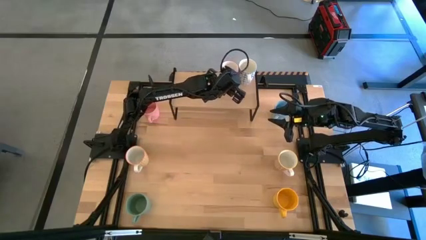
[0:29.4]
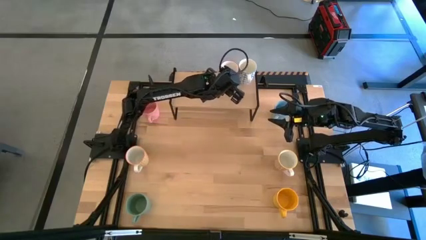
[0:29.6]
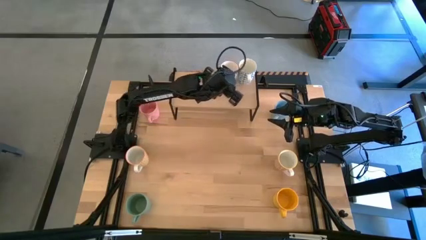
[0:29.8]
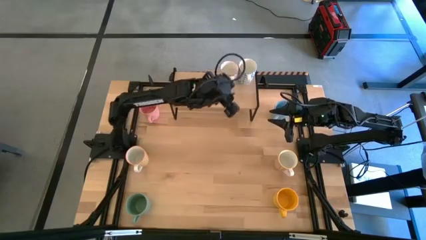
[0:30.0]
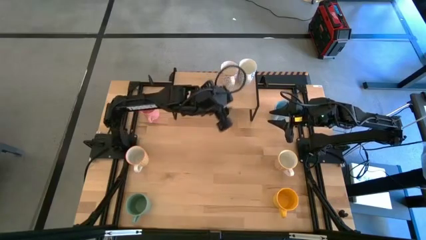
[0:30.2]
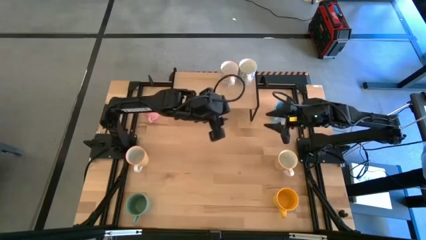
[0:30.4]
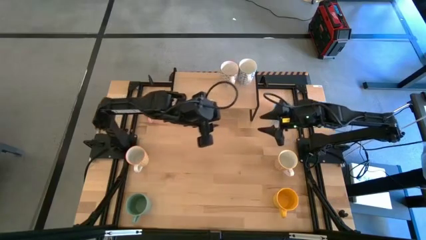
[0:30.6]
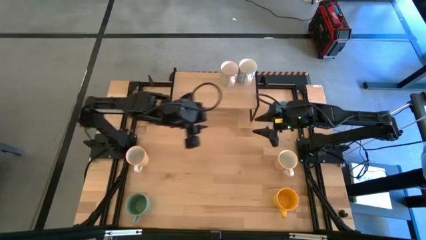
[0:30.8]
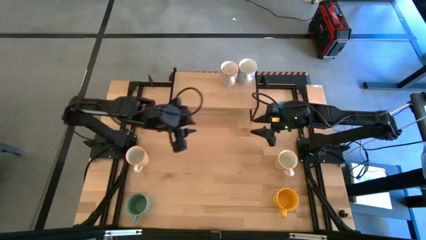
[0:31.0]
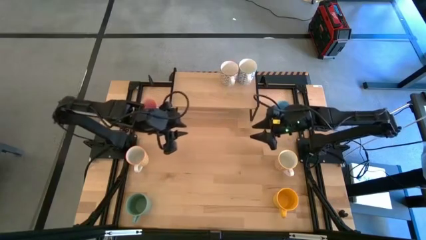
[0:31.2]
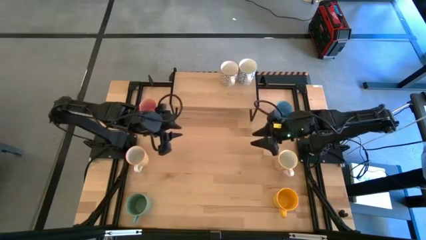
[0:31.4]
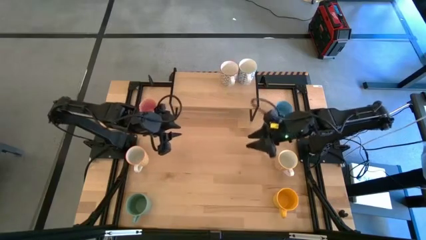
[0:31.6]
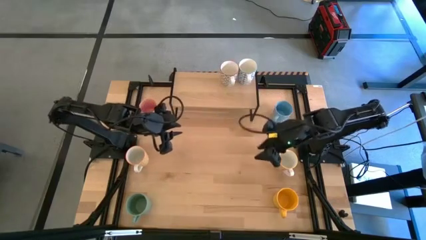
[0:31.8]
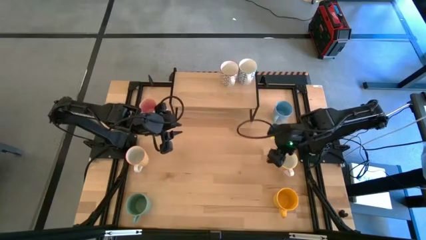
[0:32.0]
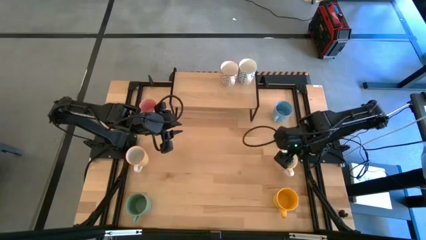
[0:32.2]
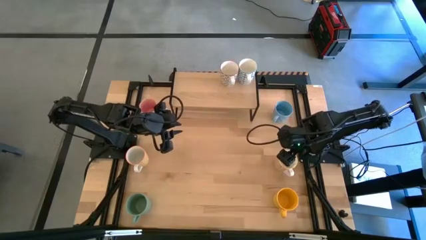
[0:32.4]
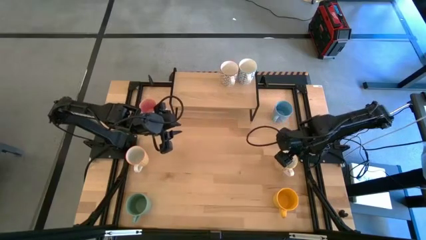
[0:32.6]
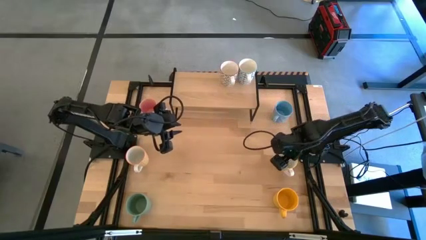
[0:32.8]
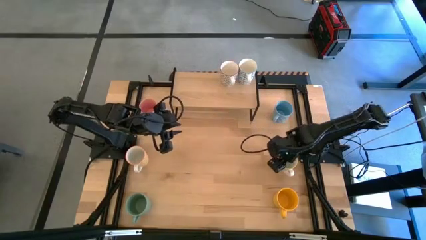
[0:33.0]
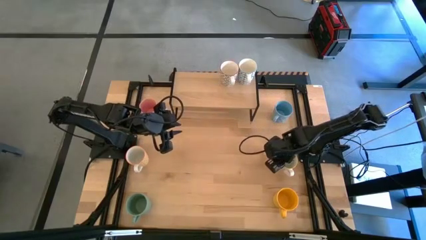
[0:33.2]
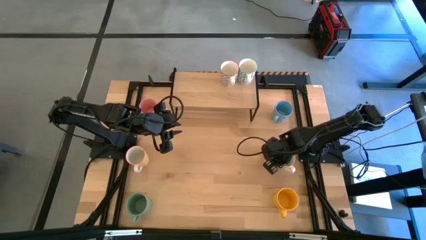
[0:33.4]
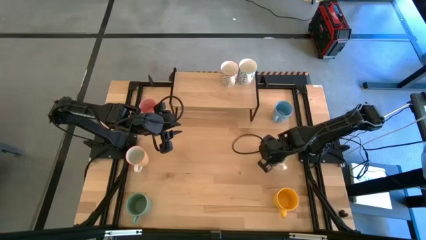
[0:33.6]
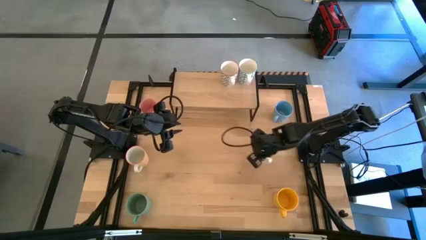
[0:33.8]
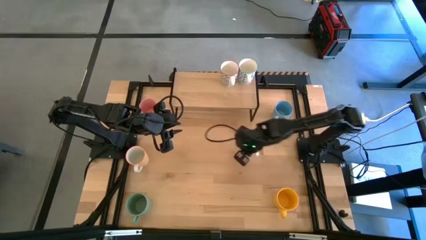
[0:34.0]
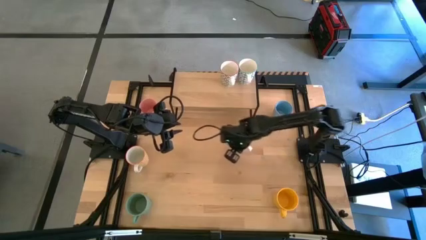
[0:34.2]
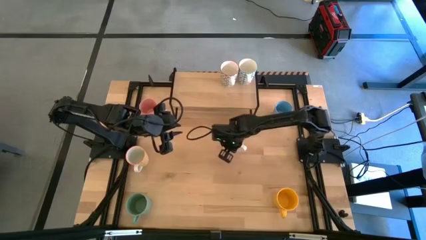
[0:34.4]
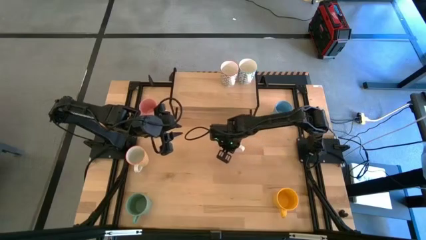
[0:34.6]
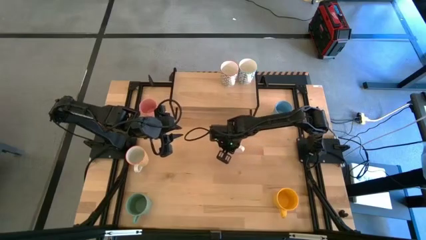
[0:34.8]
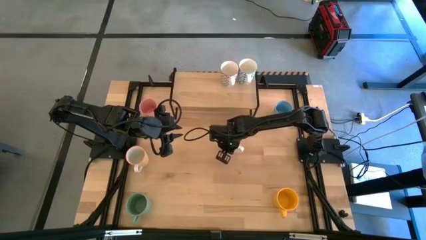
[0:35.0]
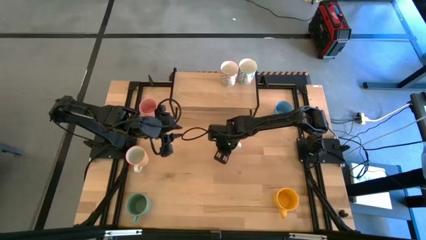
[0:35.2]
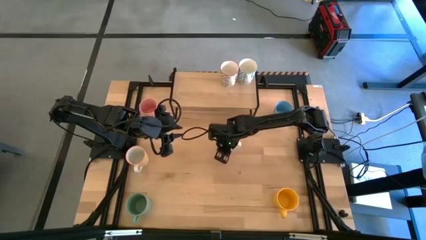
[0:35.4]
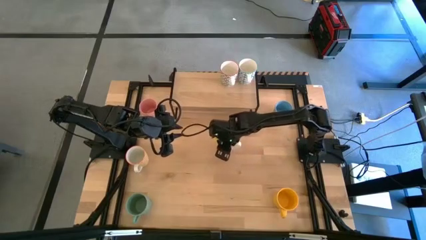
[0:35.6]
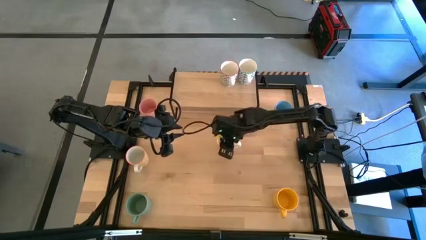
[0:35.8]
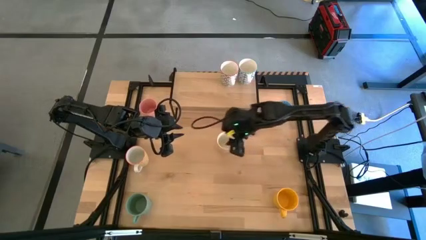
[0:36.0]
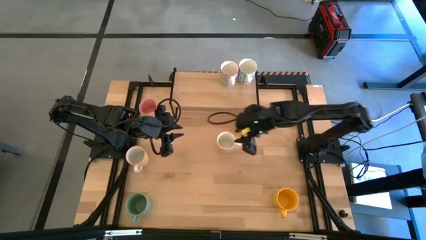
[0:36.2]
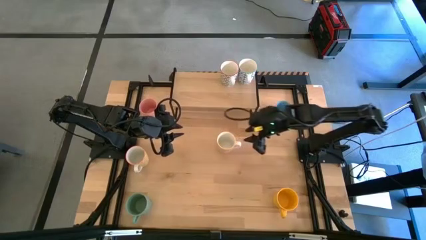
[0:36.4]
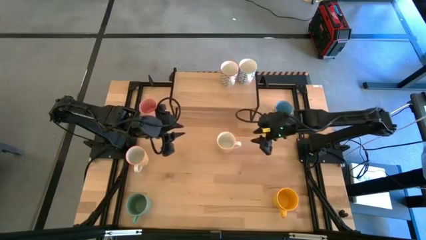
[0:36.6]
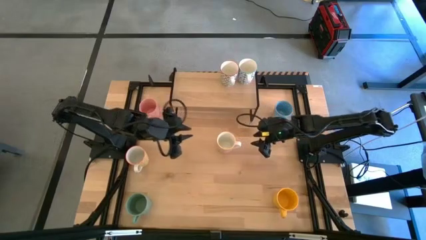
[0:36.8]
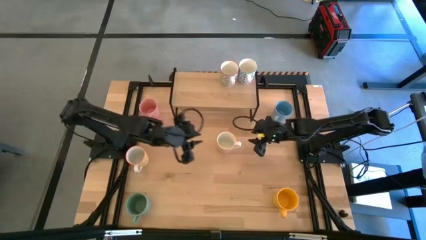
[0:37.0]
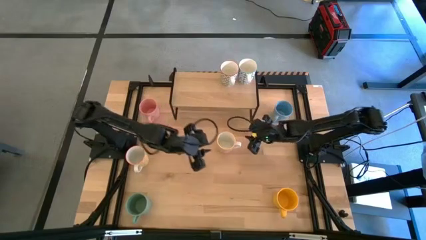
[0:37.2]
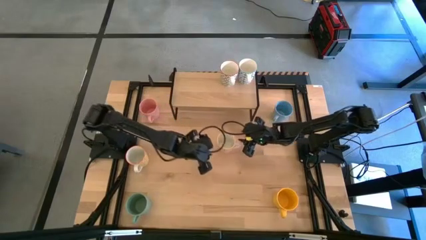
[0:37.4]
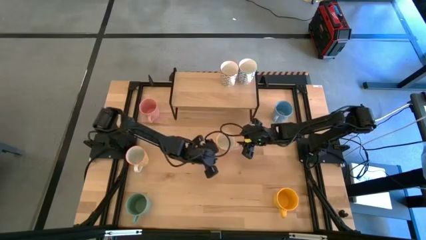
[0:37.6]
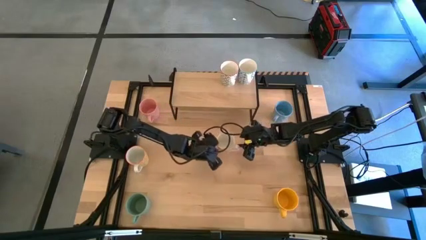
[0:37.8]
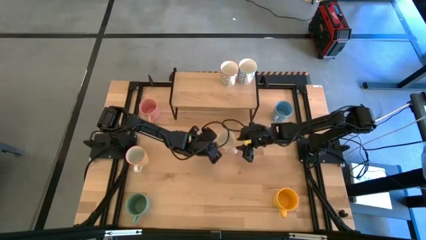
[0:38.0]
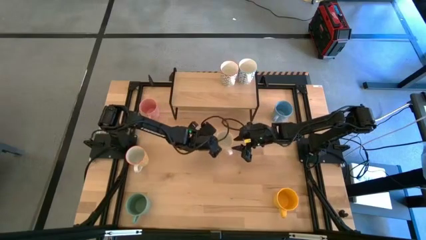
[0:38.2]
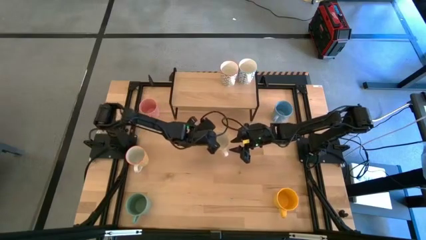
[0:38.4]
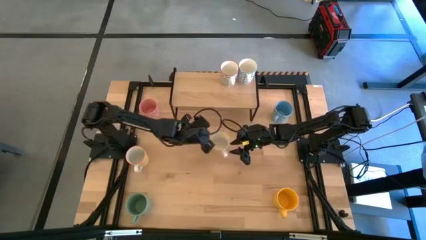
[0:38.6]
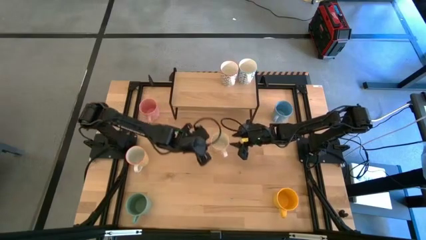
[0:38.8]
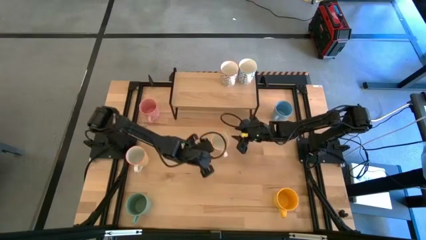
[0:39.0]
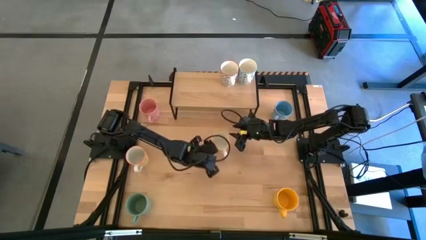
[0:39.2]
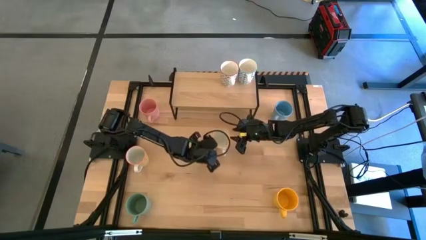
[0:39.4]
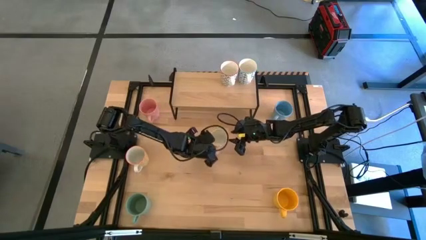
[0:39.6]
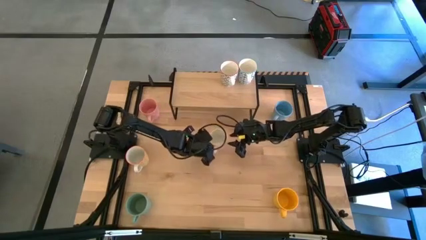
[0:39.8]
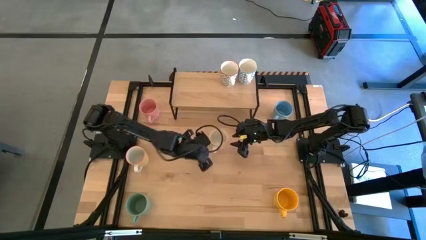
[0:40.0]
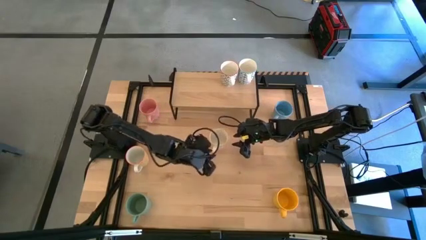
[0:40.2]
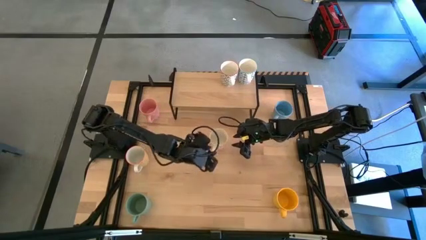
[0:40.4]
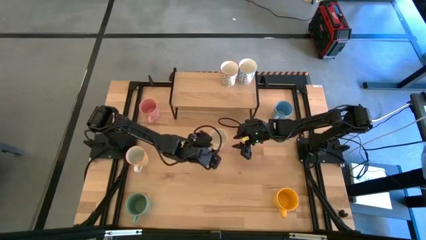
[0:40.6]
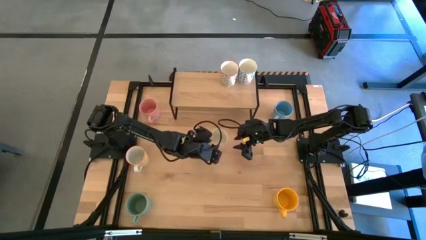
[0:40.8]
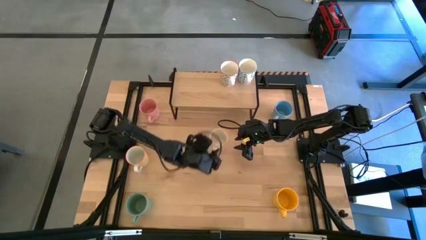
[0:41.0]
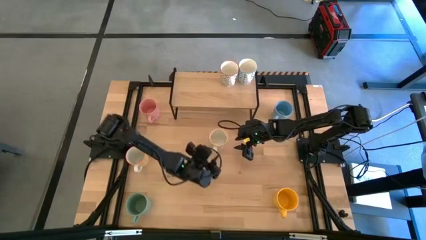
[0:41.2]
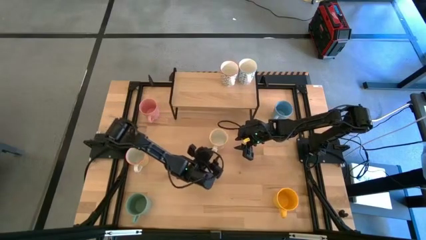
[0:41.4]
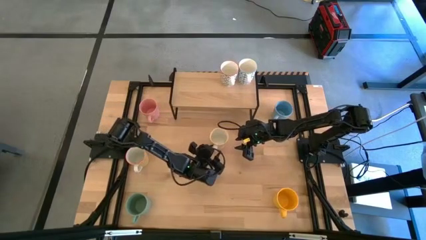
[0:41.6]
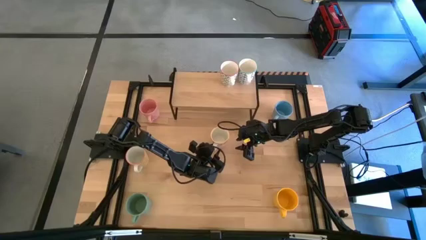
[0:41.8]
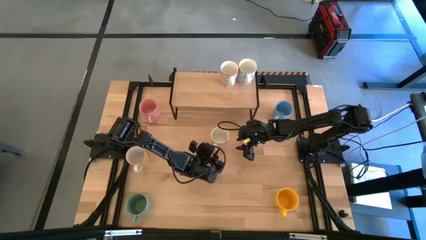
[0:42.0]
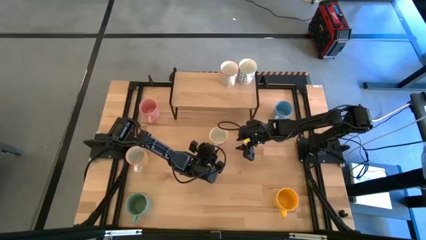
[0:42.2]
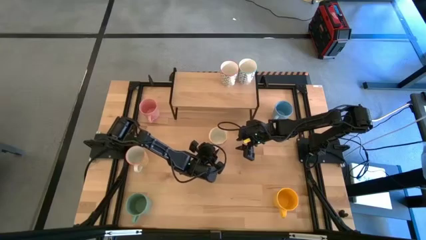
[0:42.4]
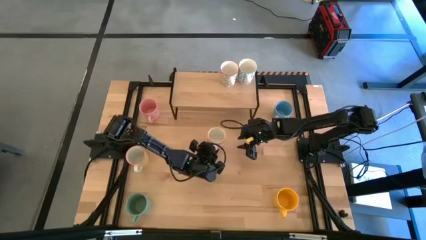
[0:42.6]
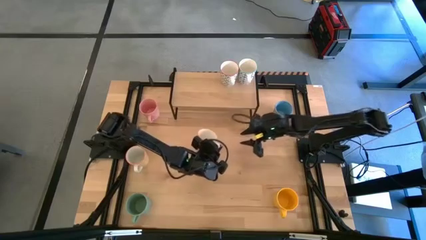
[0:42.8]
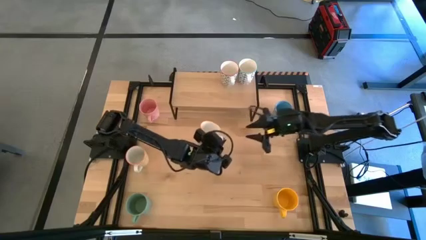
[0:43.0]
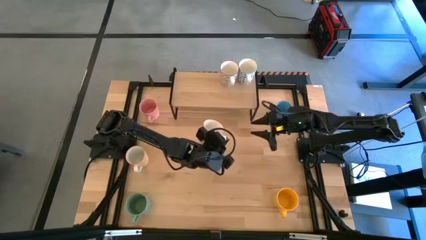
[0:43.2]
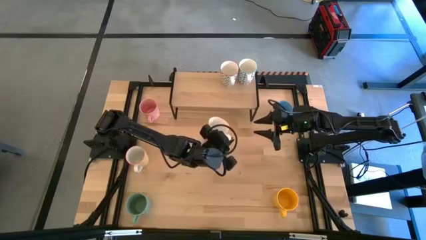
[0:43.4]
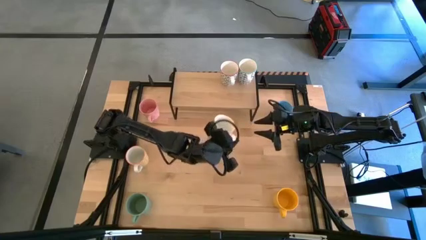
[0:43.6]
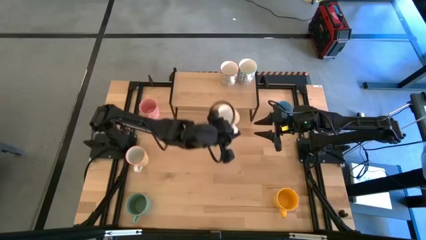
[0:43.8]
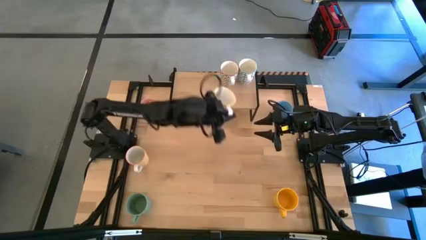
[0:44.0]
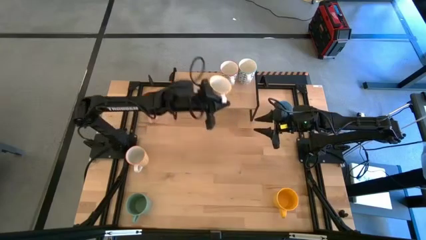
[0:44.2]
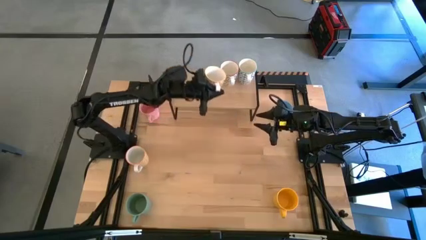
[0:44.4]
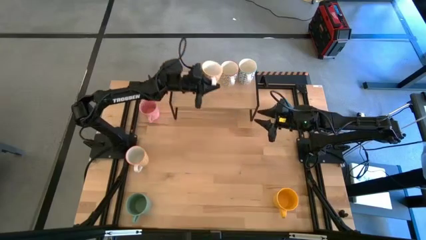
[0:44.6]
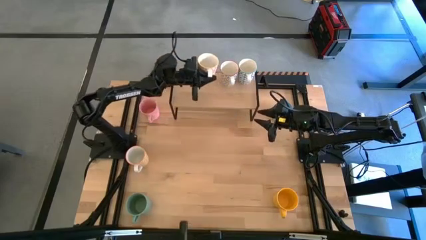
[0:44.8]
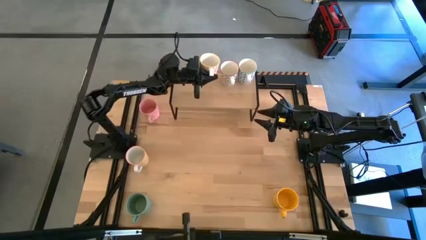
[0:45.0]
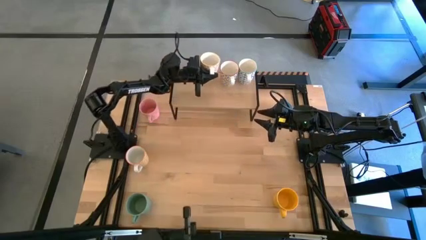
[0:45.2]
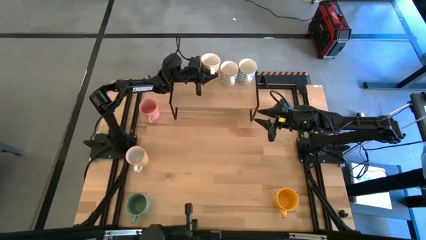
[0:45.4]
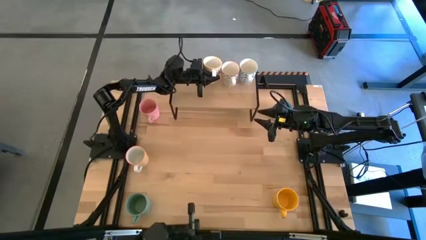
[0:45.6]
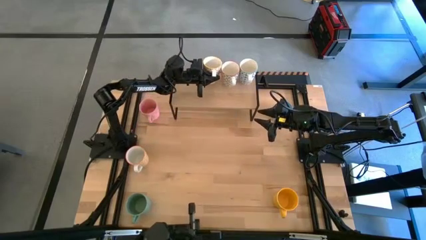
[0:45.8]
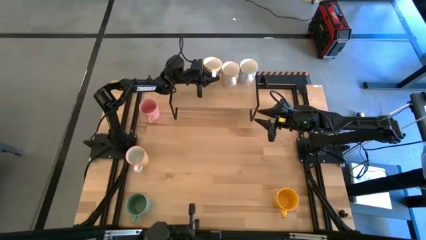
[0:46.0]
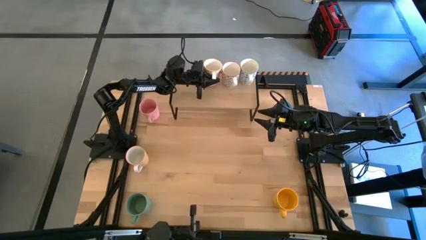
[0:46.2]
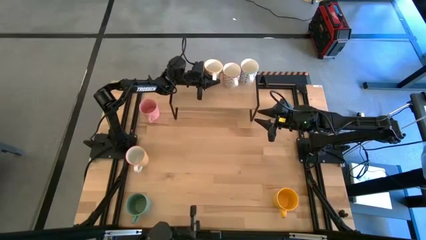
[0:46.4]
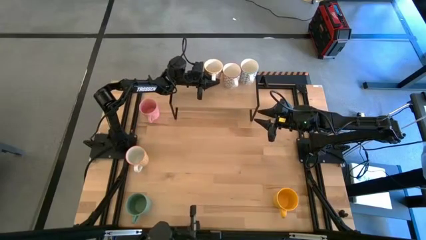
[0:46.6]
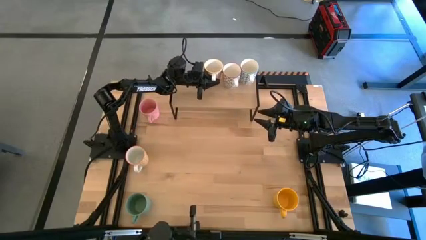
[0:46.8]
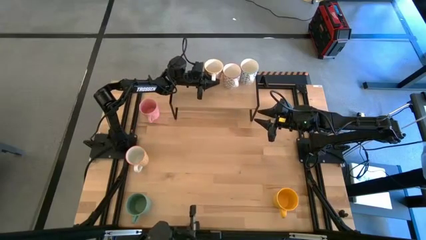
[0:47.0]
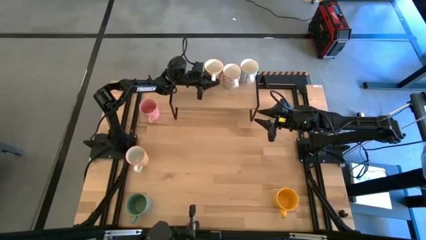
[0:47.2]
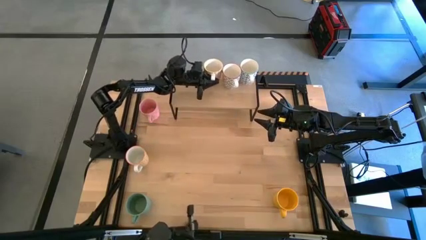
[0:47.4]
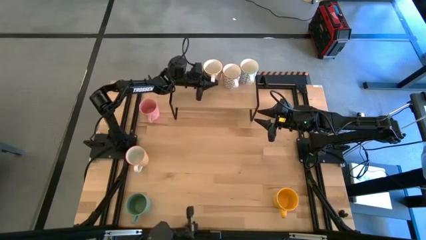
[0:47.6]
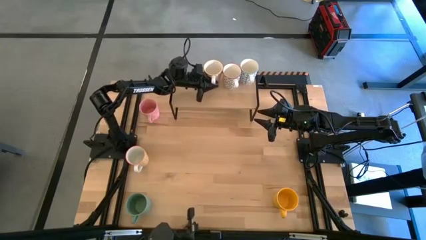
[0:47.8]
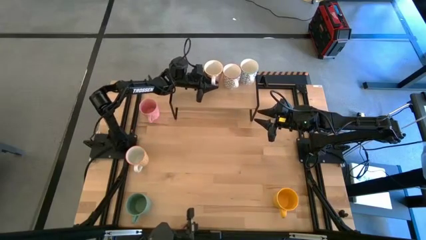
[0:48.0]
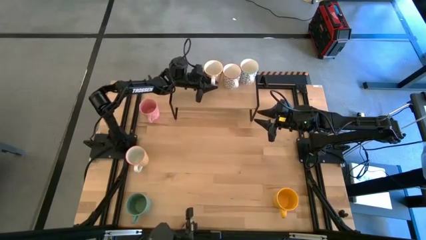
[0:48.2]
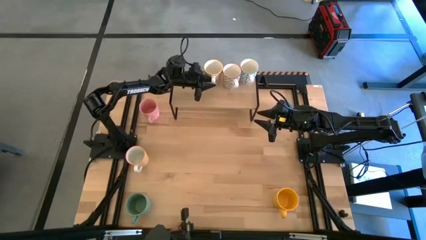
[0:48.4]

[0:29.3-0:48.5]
Task: Place coffee mugs
Put the orange patterned mug on the shelf
